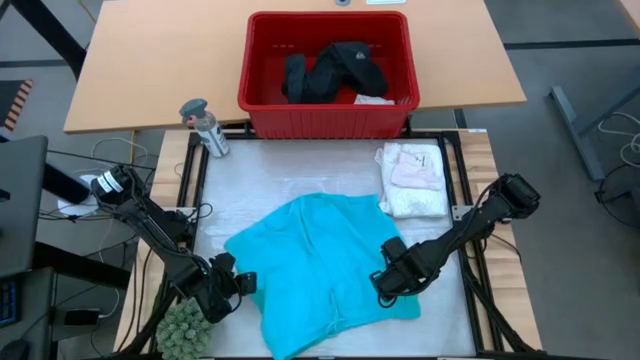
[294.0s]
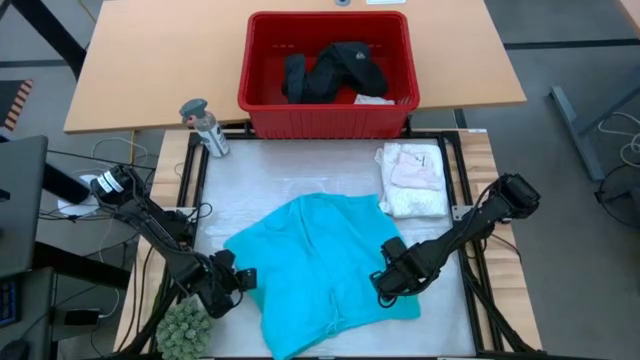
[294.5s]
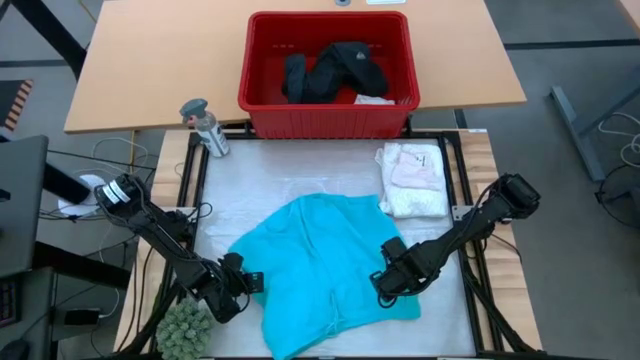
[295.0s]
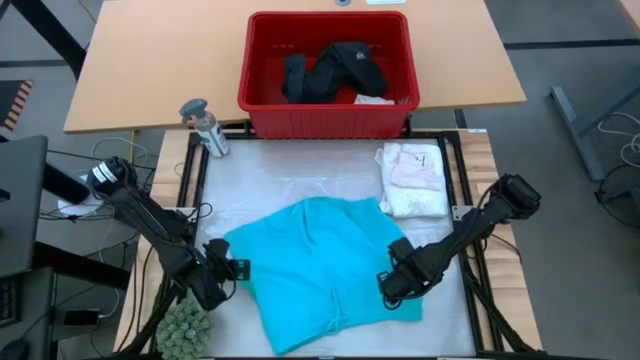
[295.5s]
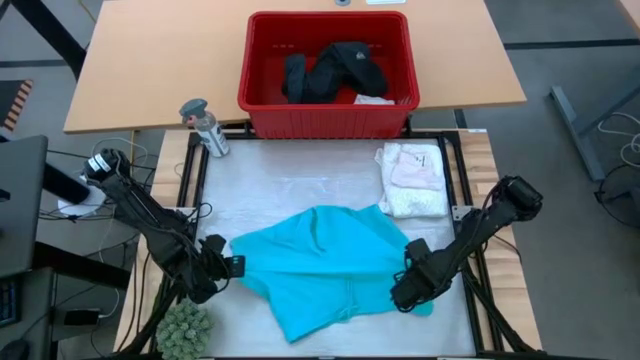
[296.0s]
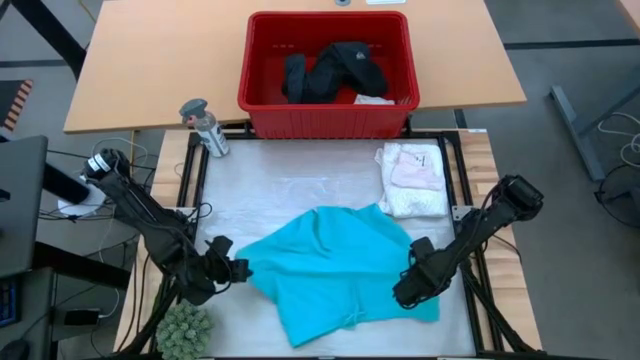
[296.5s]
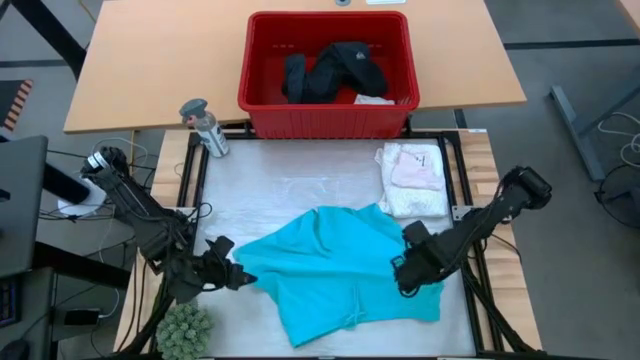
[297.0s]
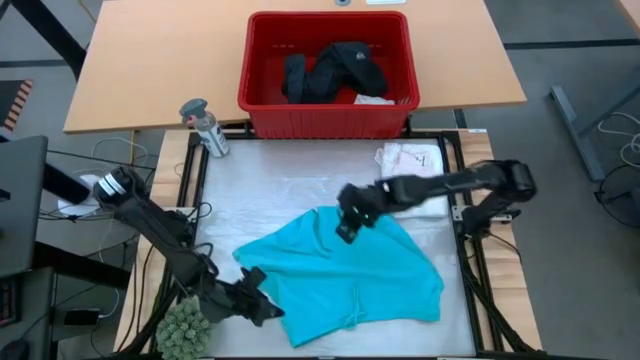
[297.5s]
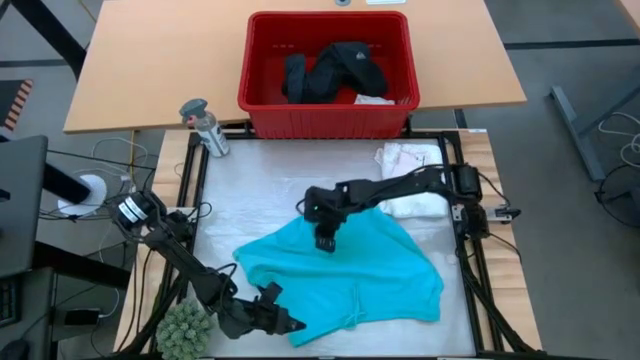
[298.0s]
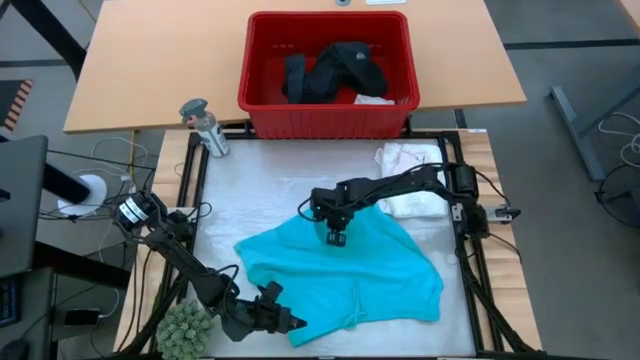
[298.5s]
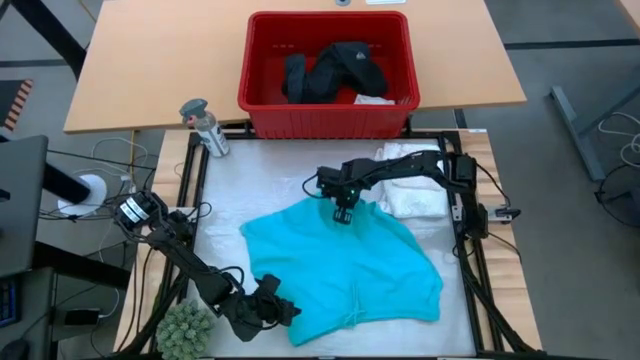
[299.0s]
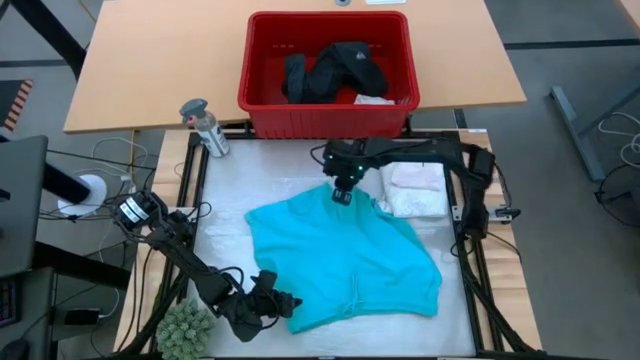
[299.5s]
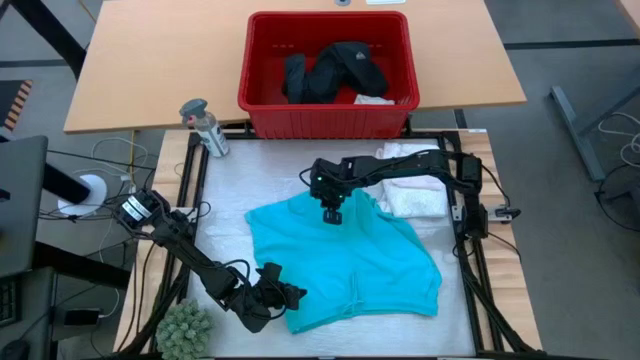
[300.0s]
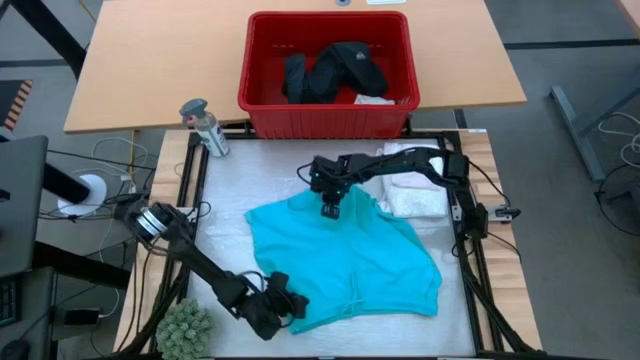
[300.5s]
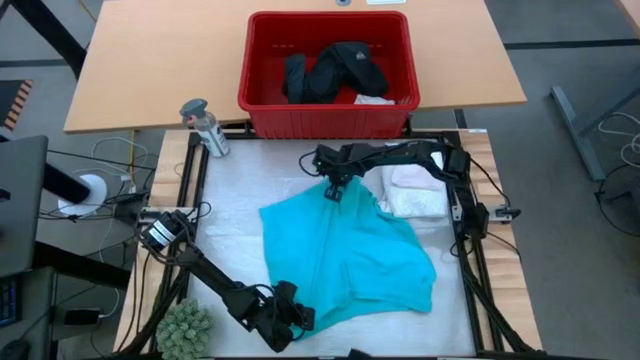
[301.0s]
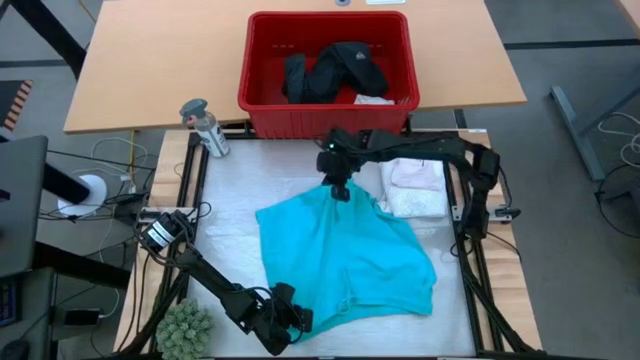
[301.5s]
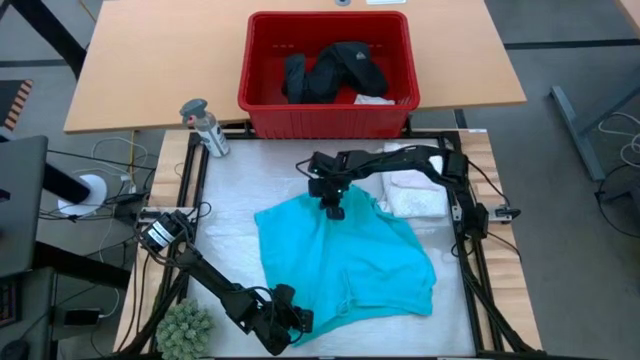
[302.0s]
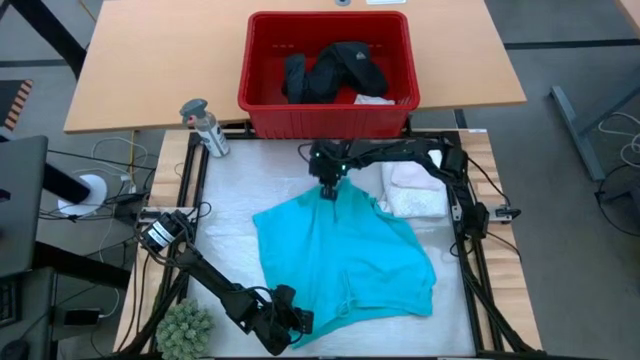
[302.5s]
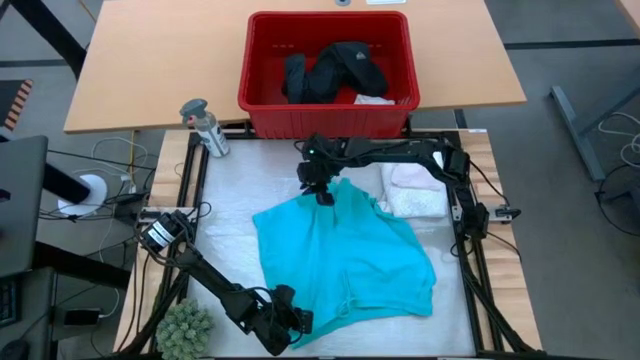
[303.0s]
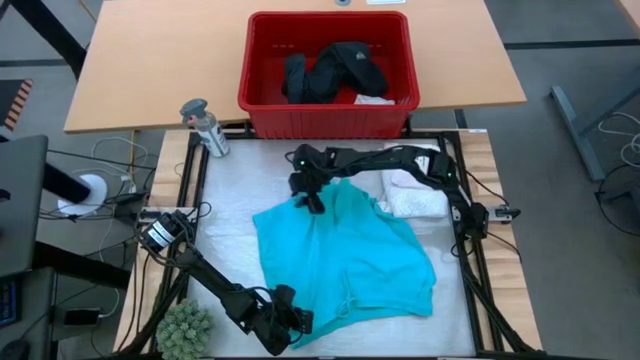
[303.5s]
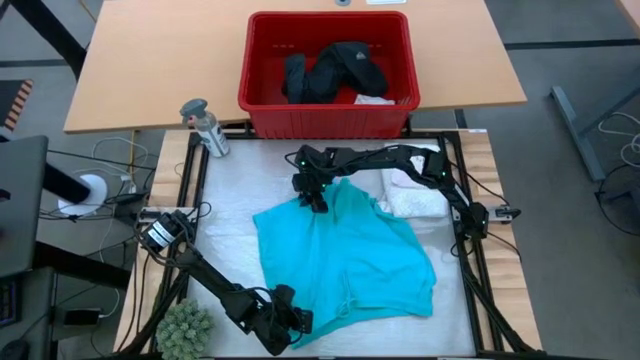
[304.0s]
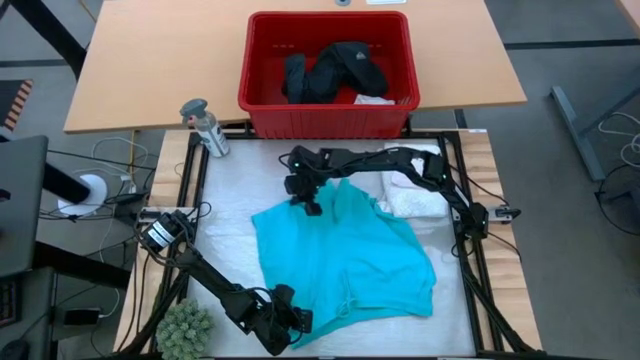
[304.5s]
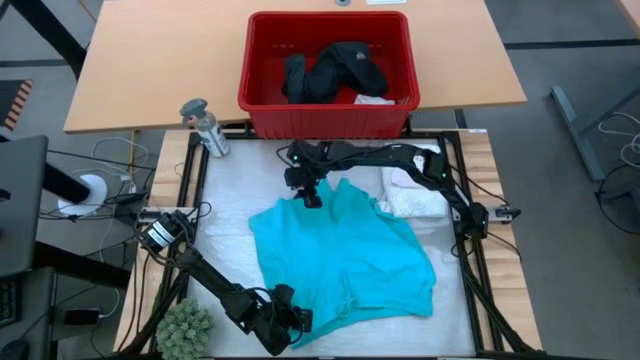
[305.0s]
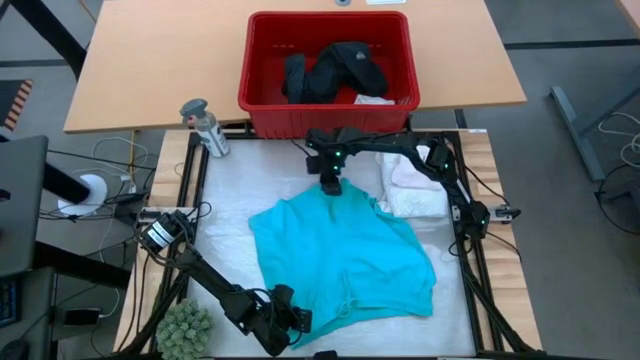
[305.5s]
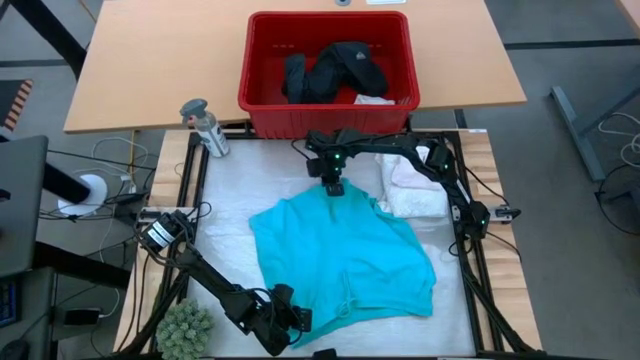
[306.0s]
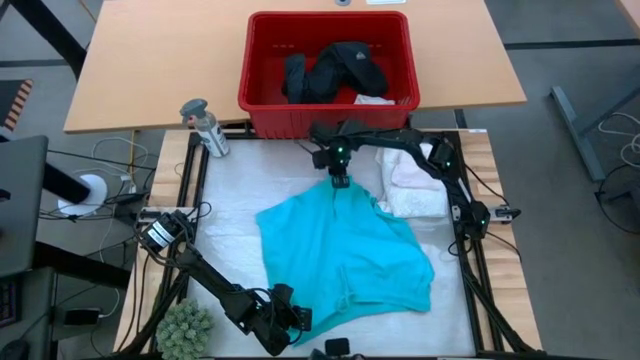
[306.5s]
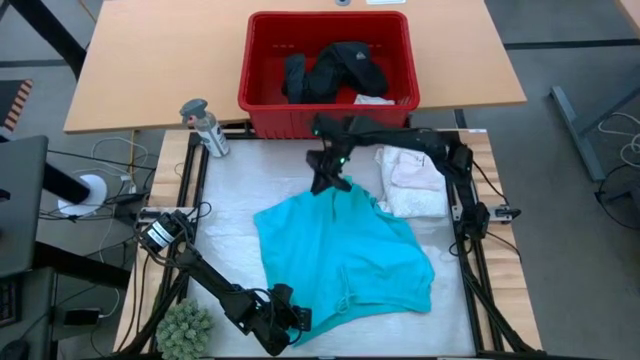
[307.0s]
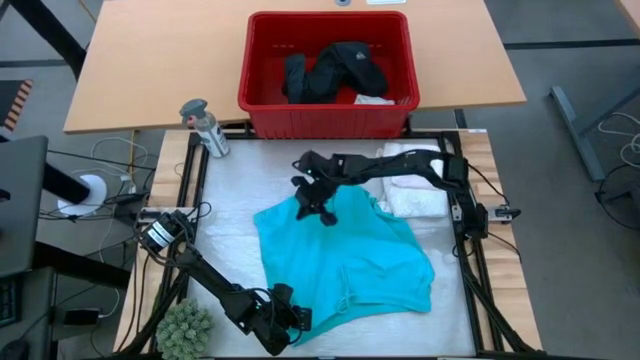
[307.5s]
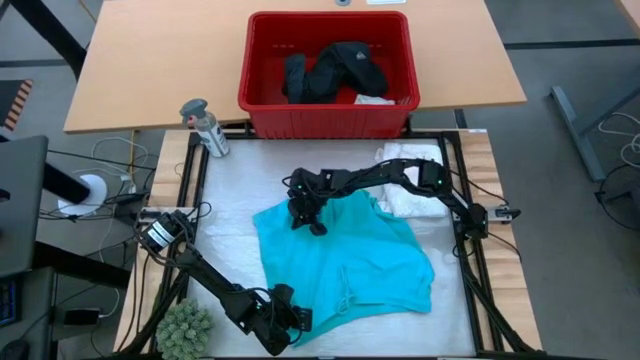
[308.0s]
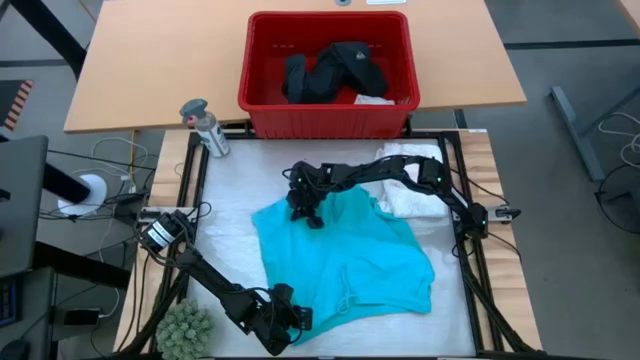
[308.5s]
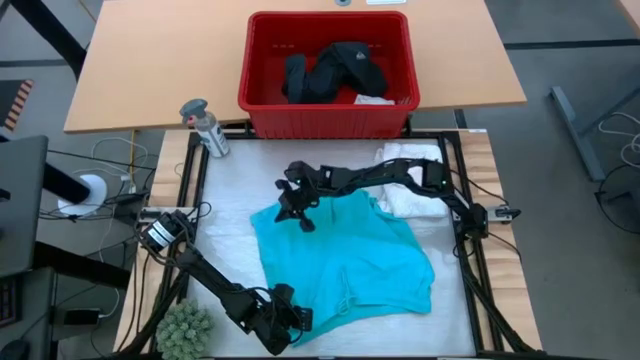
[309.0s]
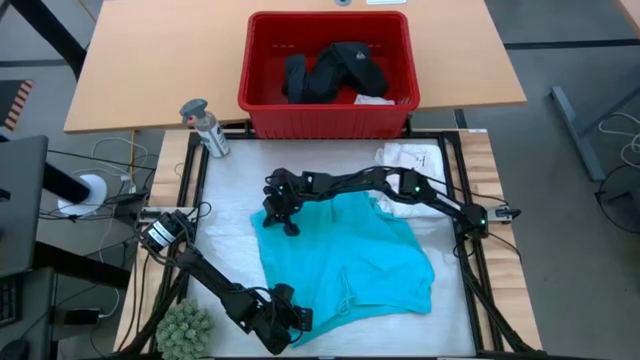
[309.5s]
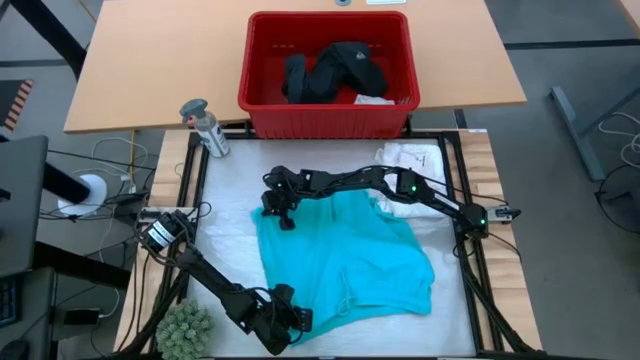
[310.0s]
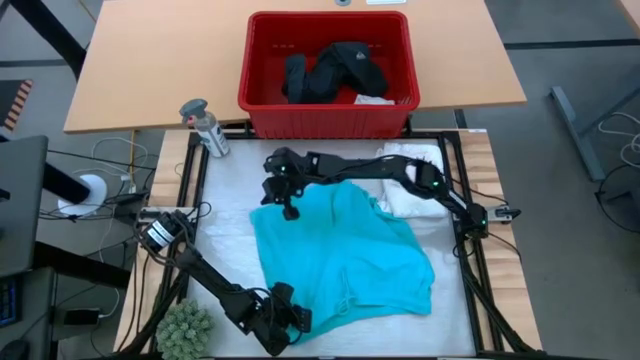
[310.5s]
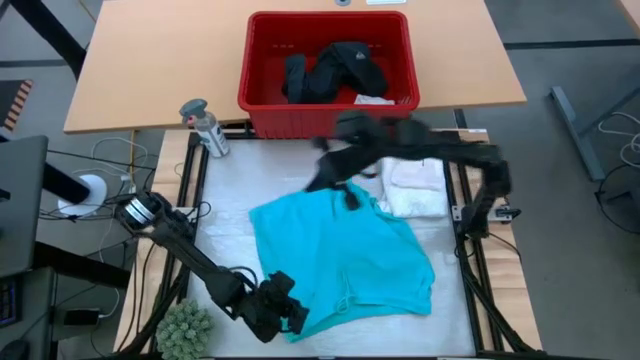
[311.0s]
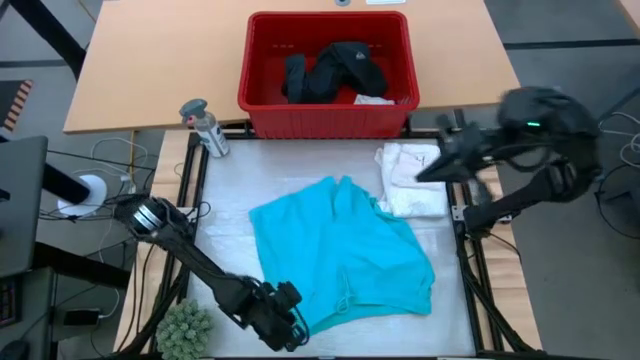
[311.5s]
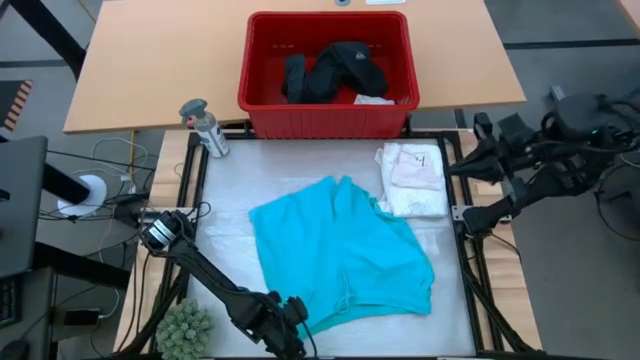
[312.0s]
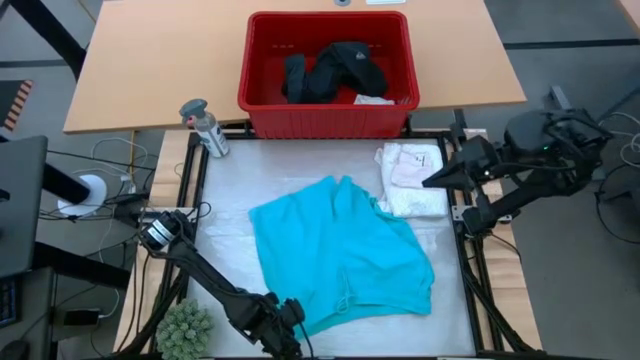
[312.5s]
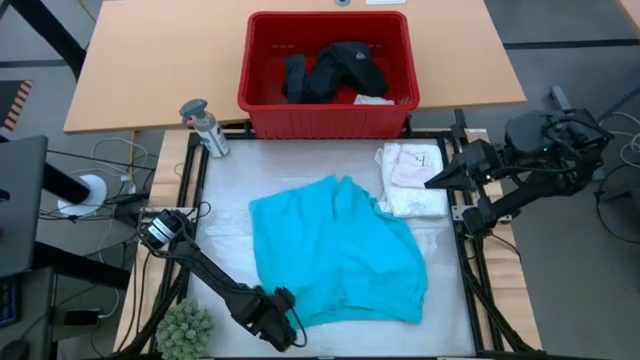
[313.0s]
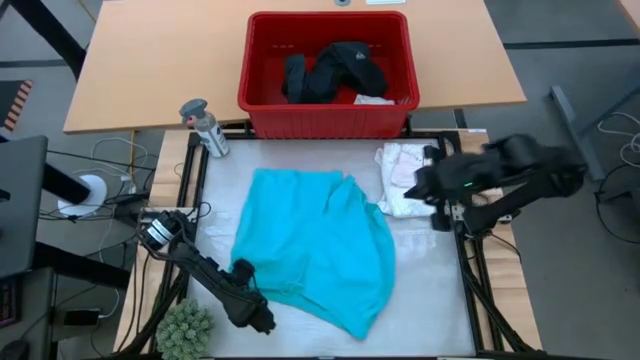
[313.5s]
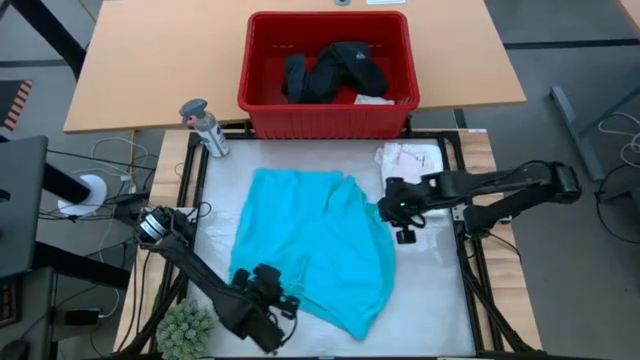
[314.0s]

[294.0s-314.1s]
Task: Fold Laundry from Bin
Fold the light blue shorts
